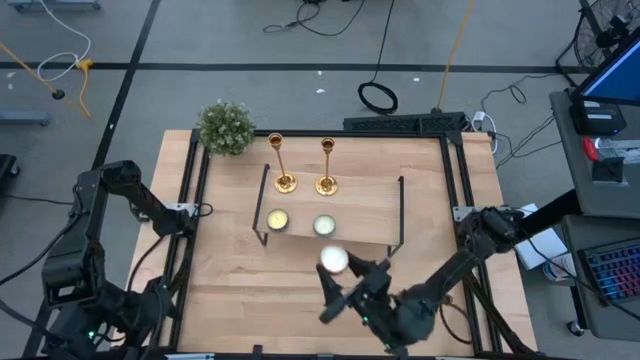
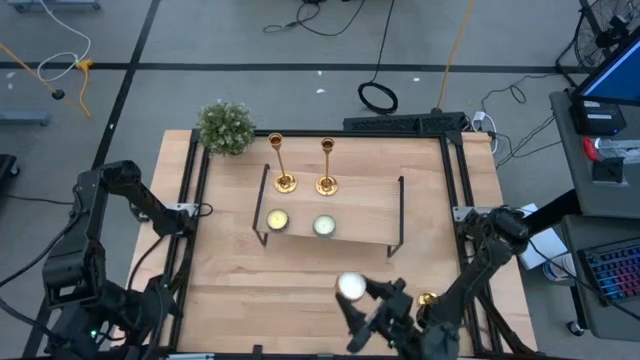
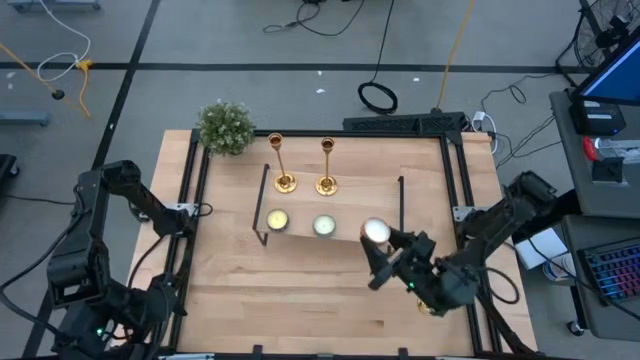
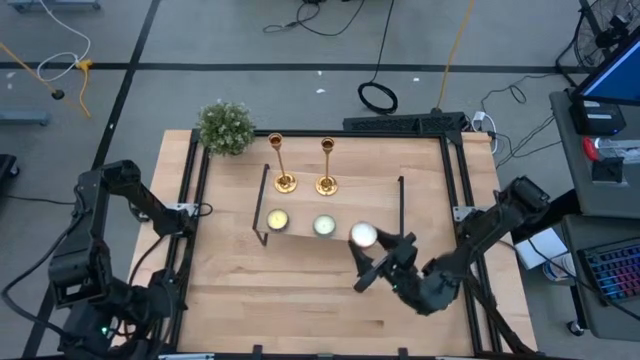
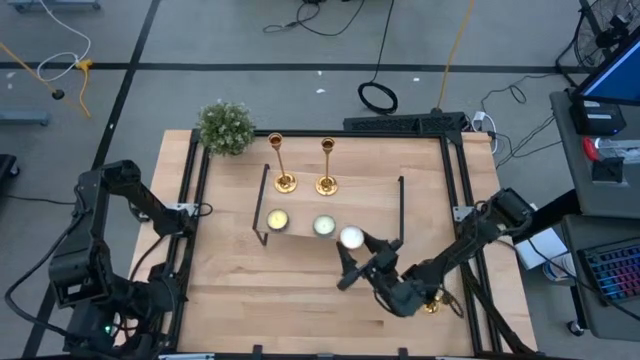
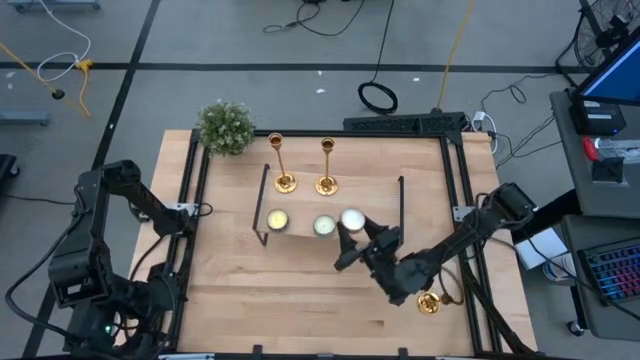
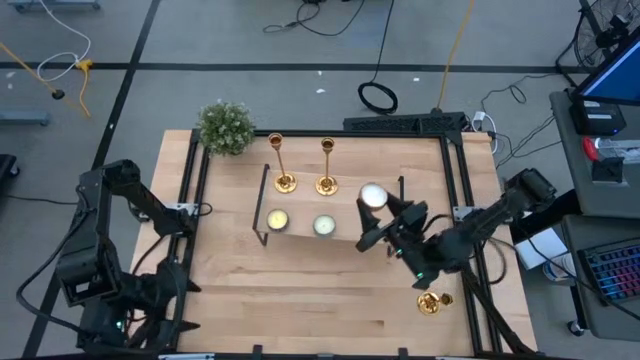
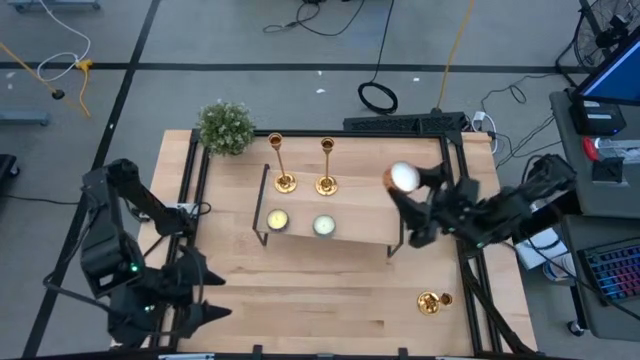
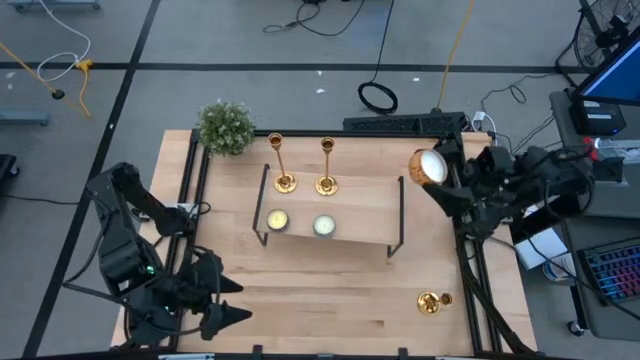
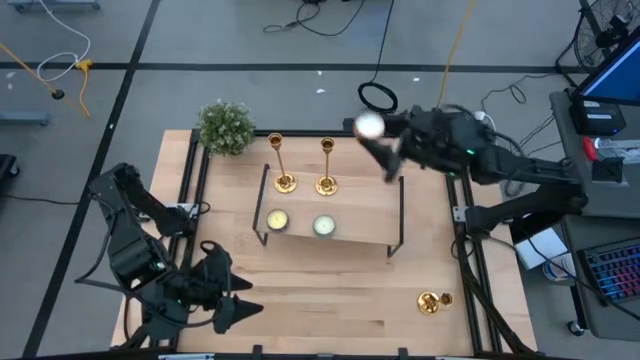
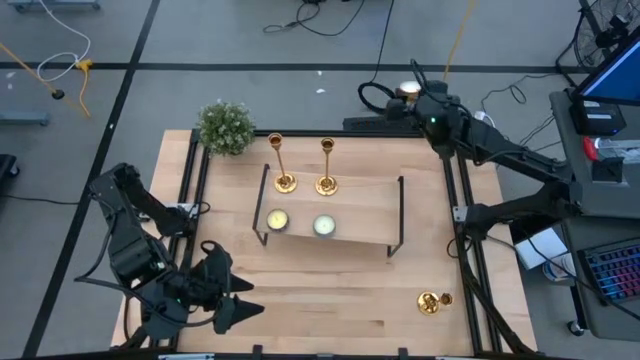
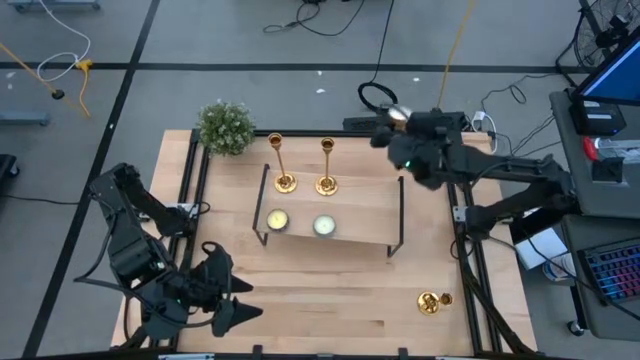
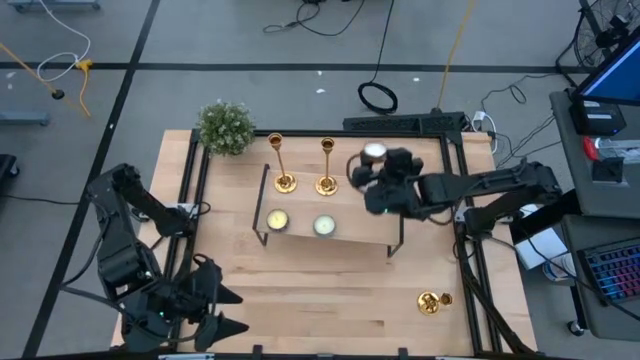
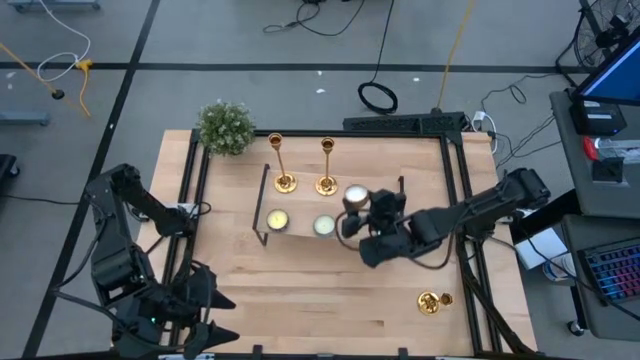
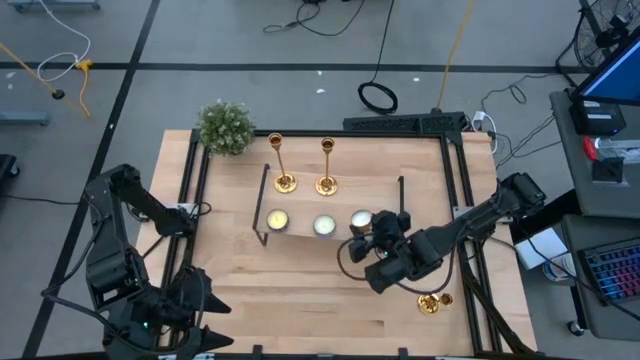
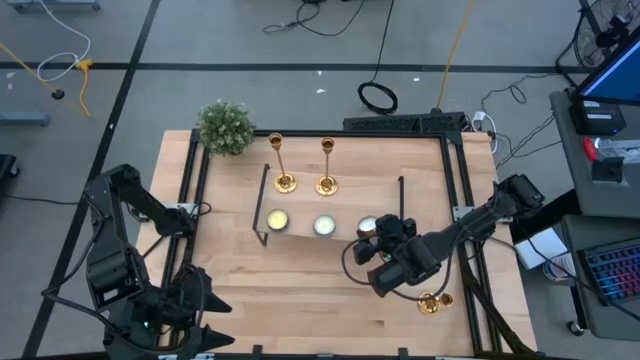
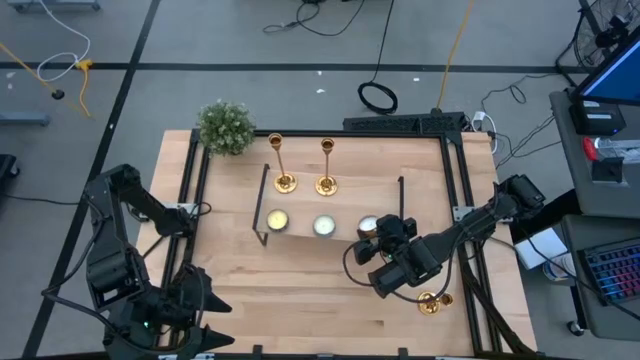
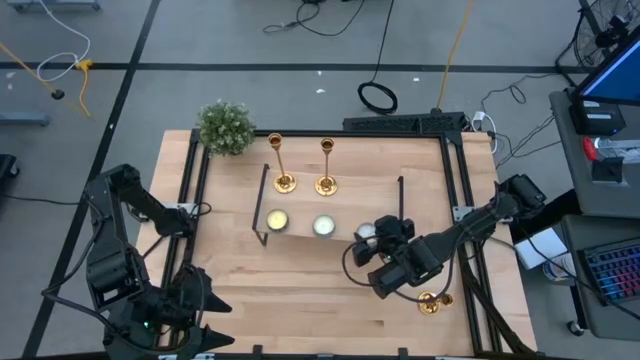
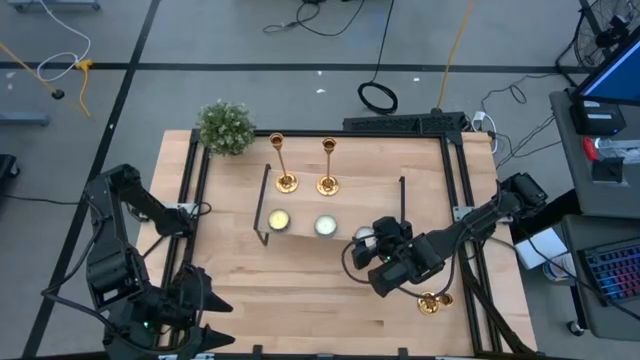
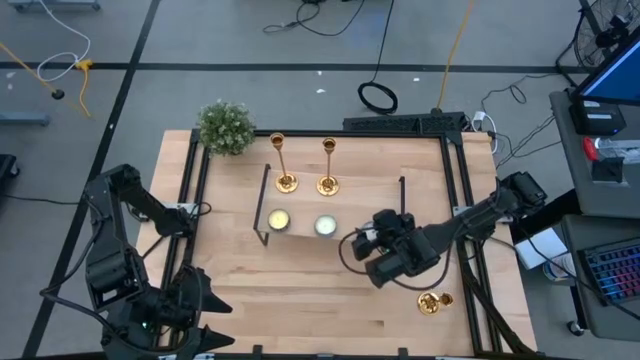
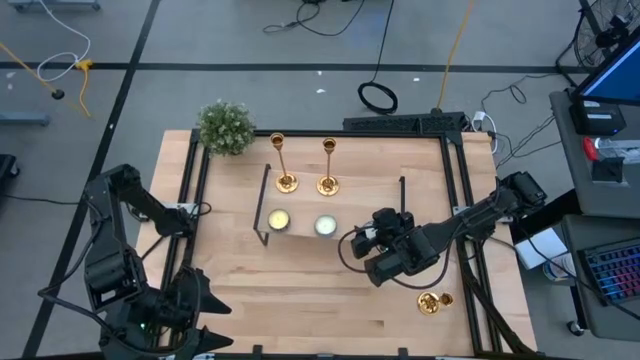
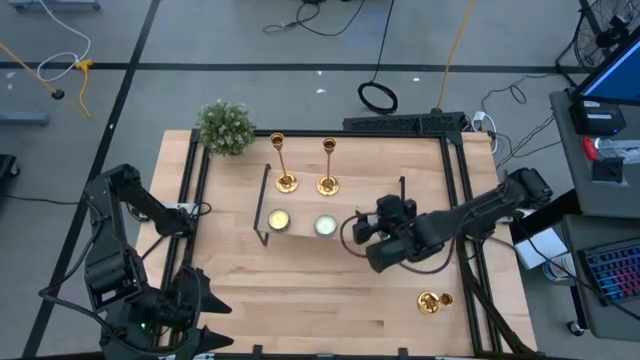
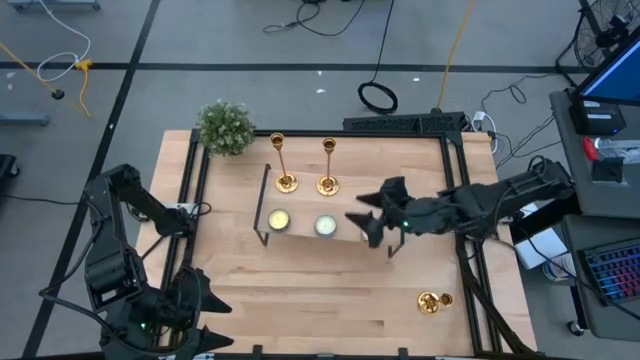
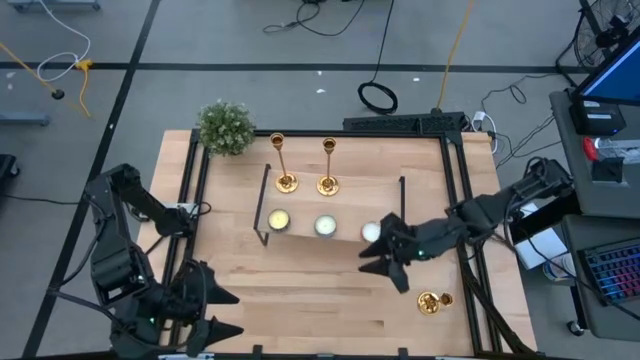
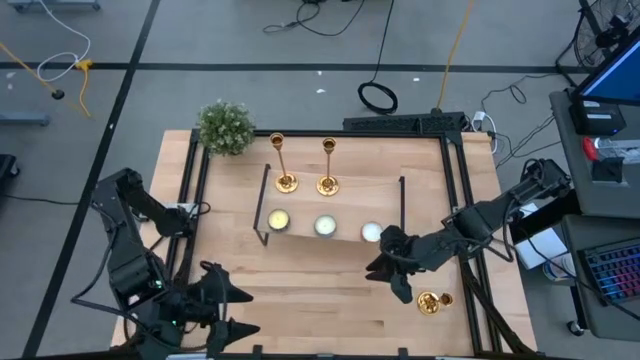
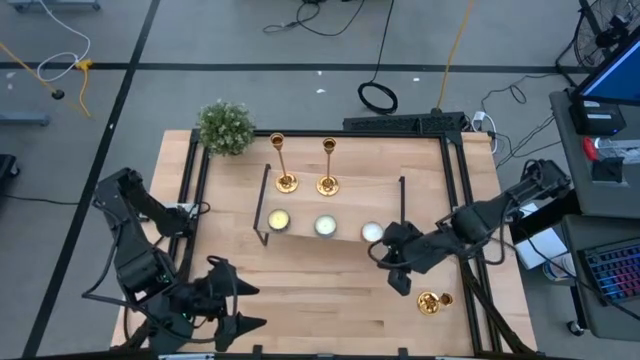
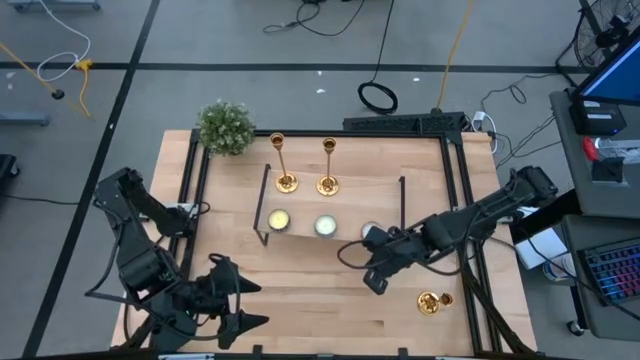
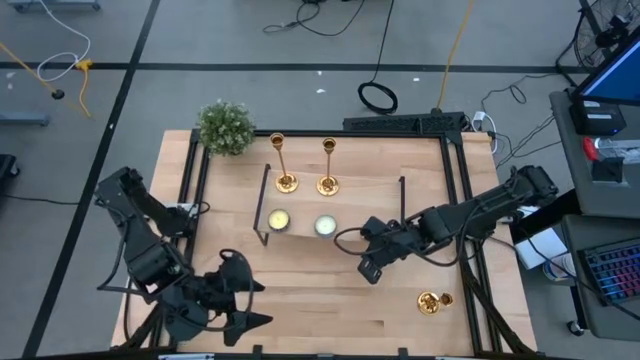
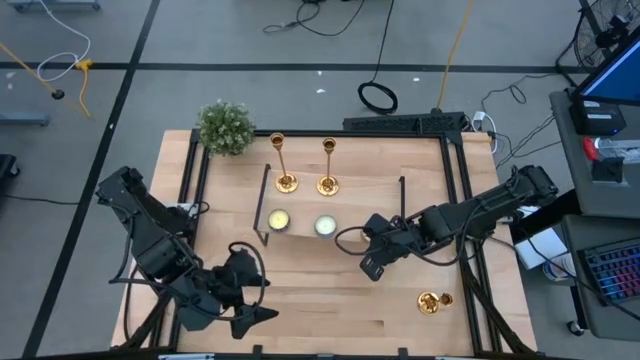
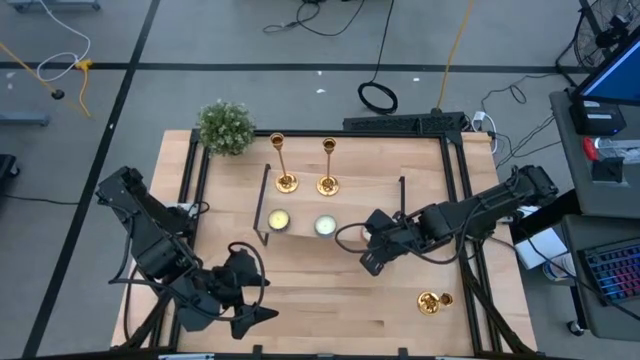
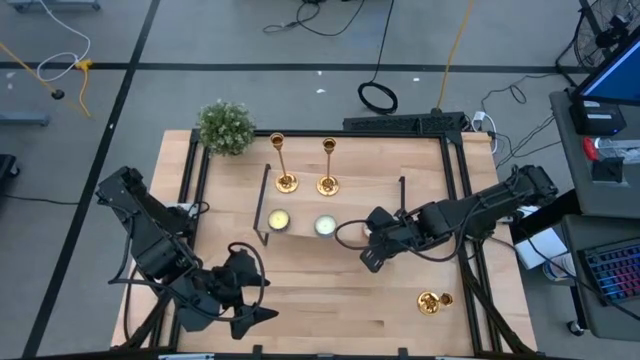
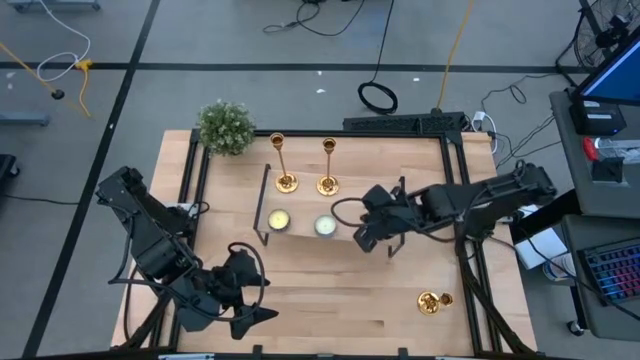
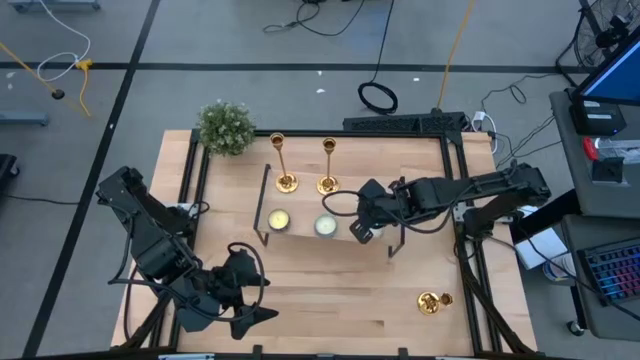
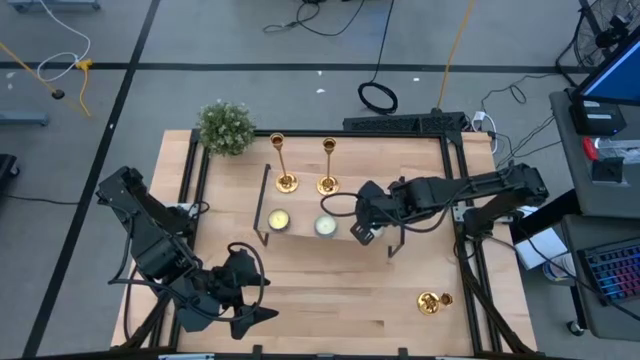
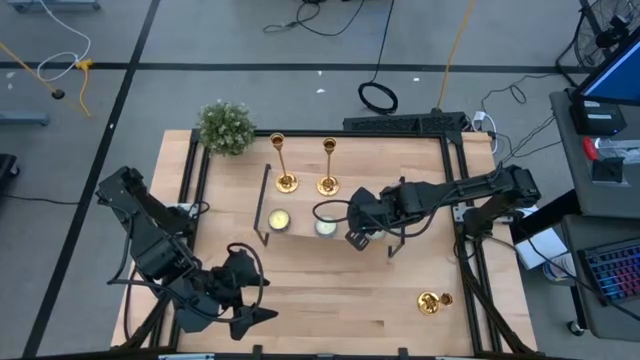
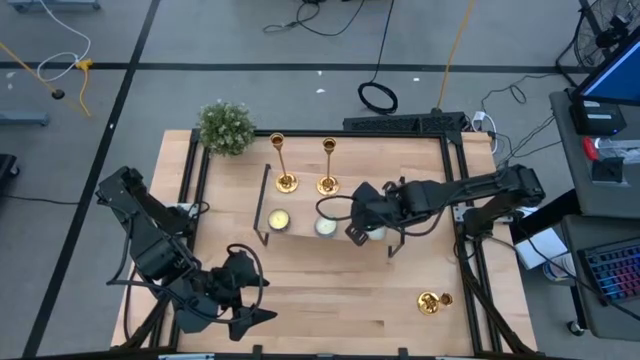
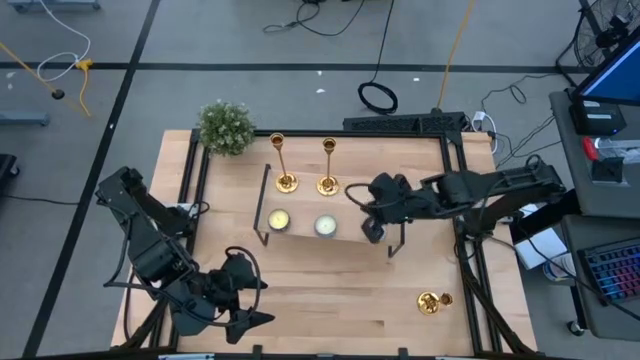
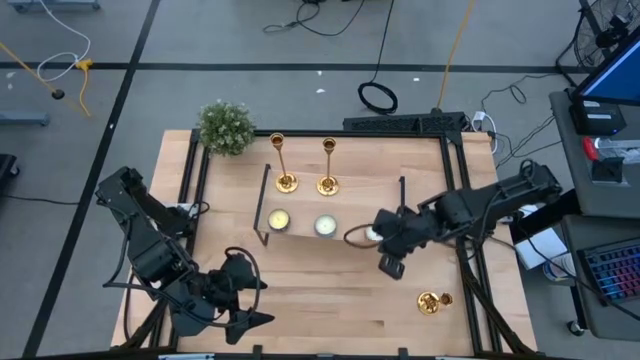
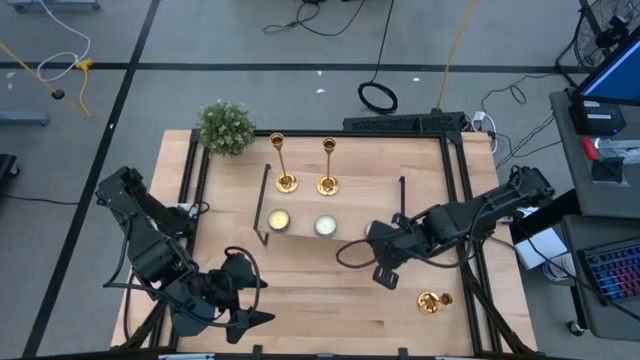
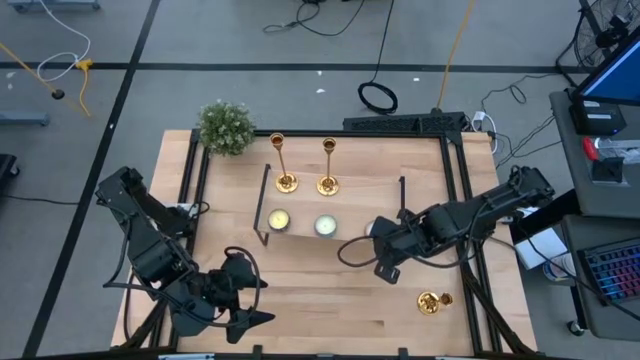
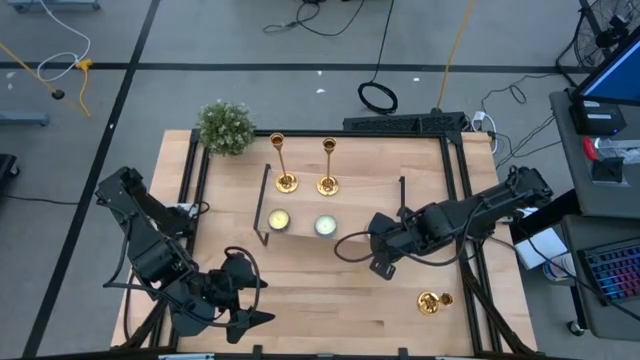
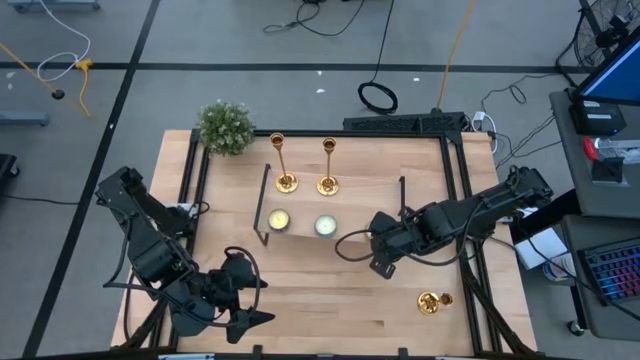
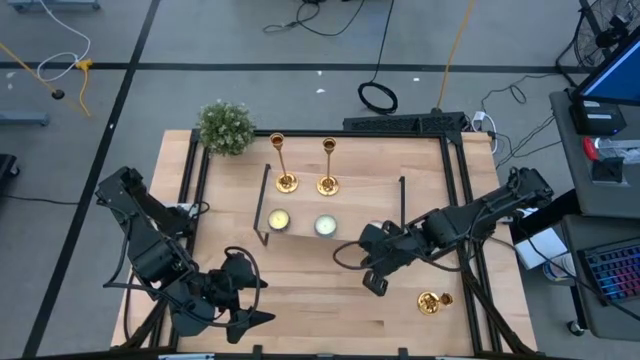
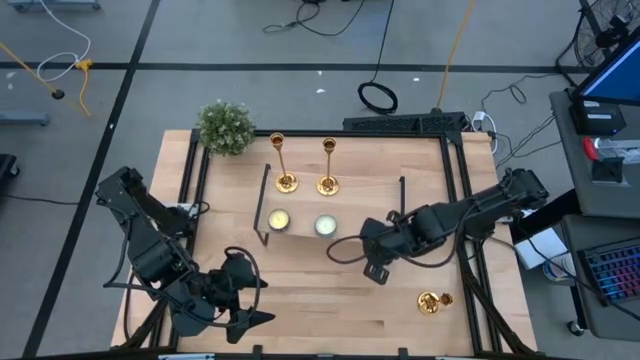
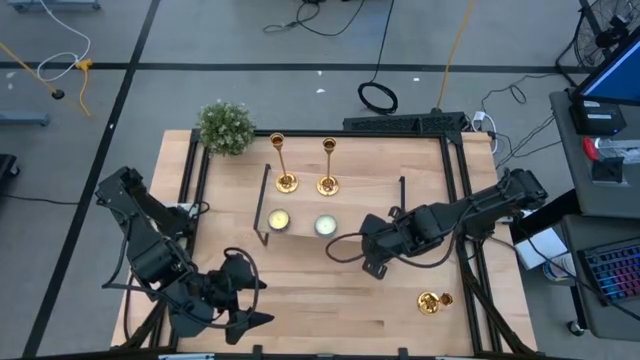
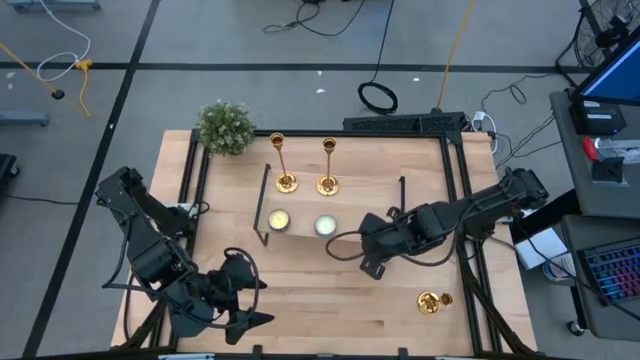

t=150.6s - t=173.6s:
Task: Pick & Place candle stick holders
Put the yellow scented candle on the shelf
